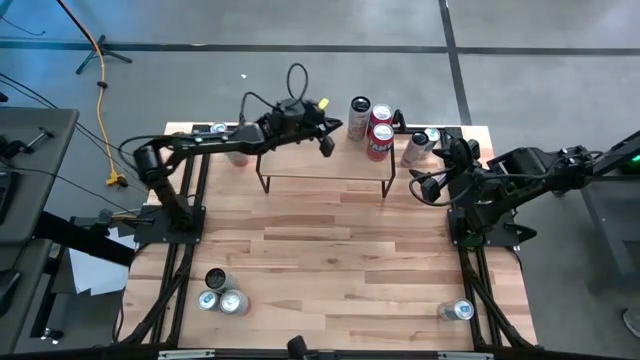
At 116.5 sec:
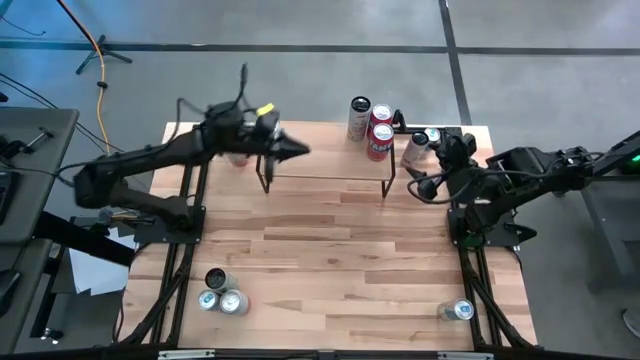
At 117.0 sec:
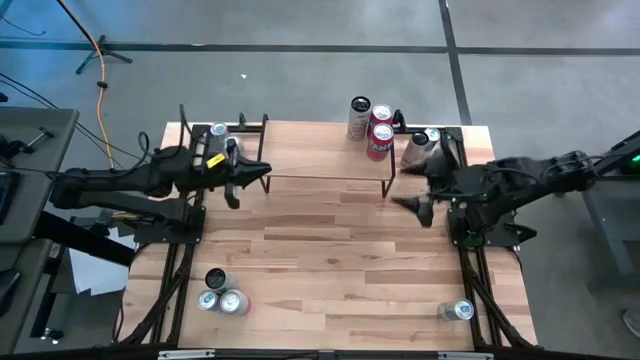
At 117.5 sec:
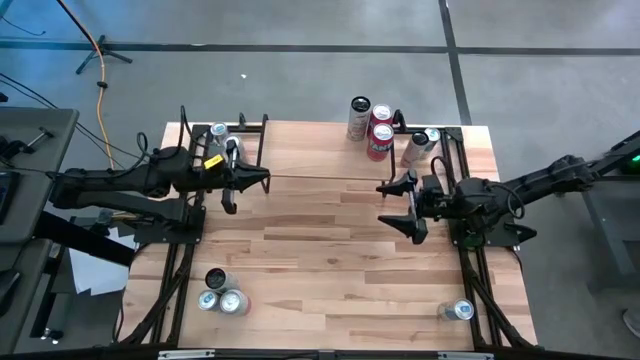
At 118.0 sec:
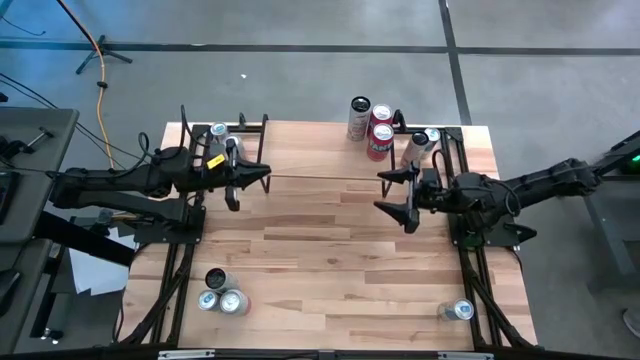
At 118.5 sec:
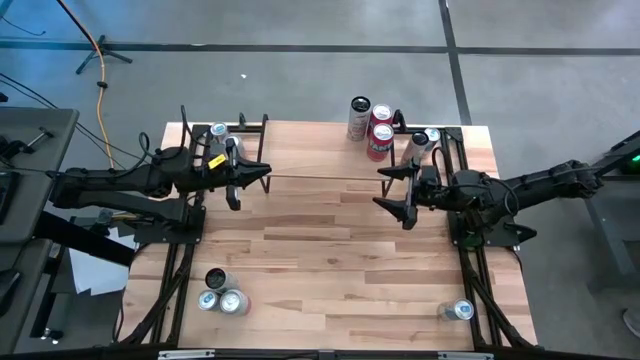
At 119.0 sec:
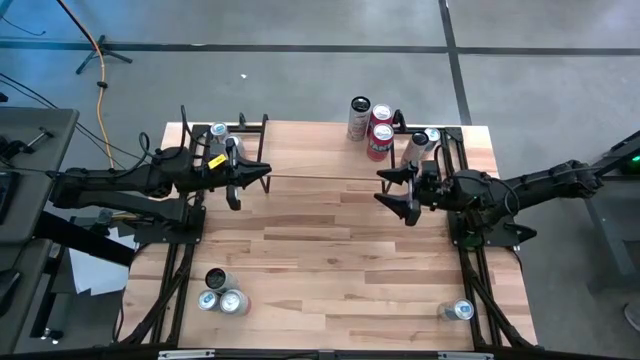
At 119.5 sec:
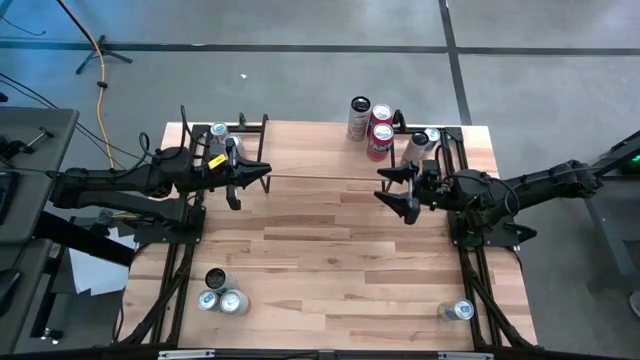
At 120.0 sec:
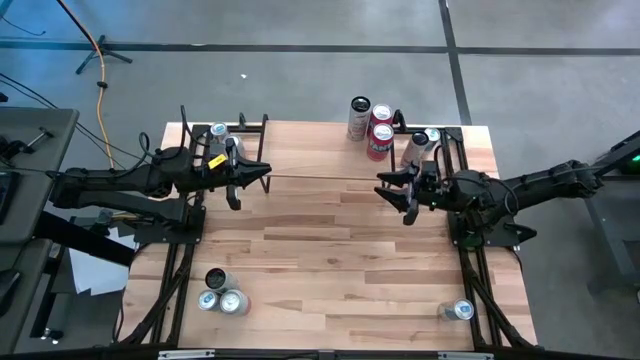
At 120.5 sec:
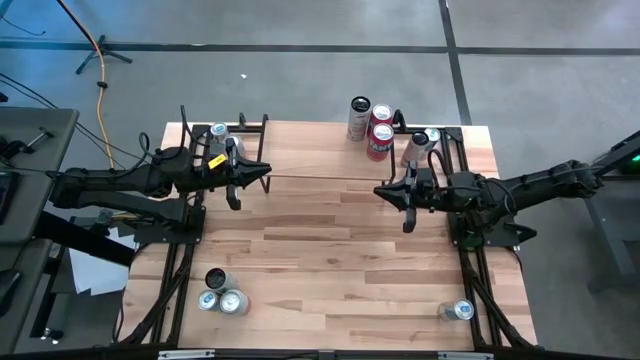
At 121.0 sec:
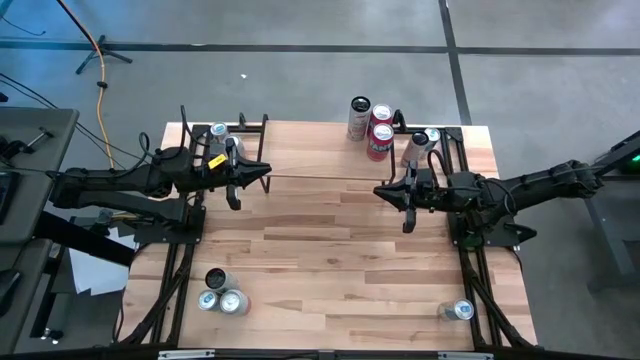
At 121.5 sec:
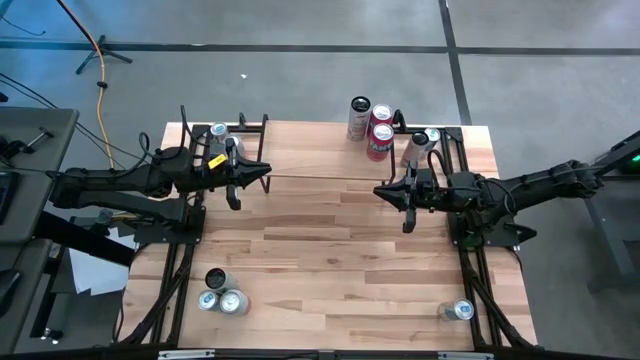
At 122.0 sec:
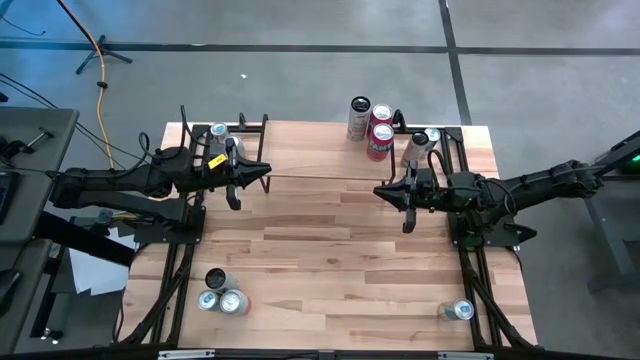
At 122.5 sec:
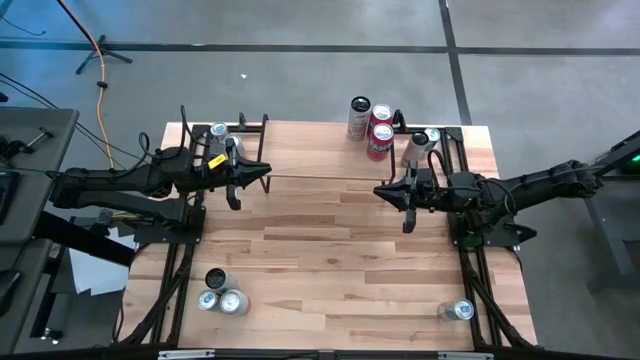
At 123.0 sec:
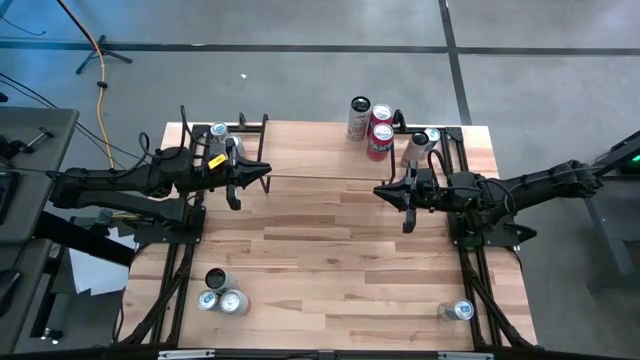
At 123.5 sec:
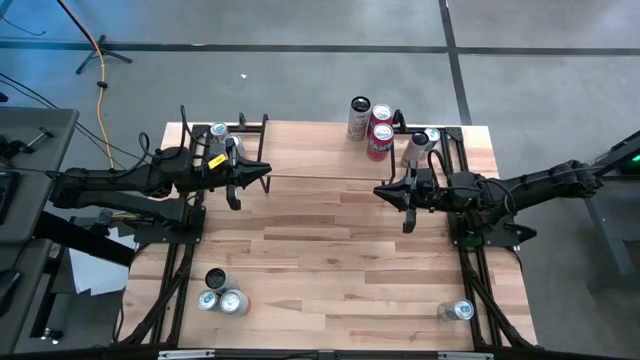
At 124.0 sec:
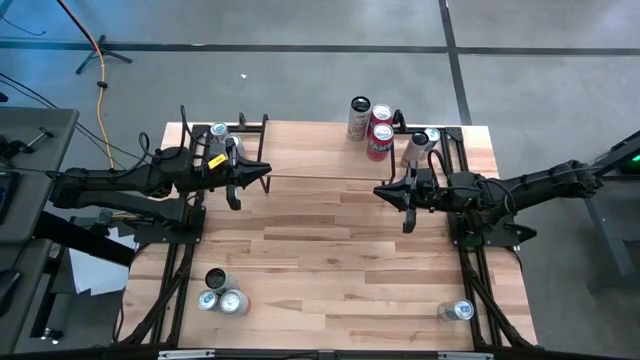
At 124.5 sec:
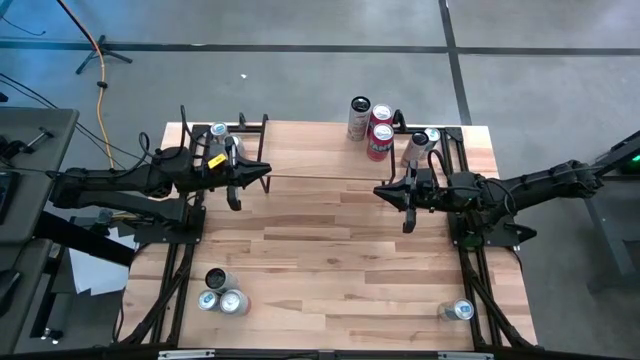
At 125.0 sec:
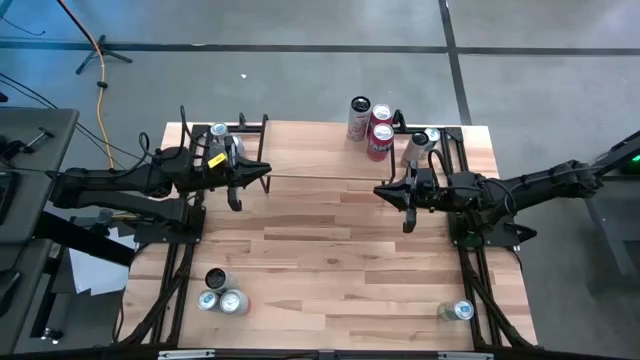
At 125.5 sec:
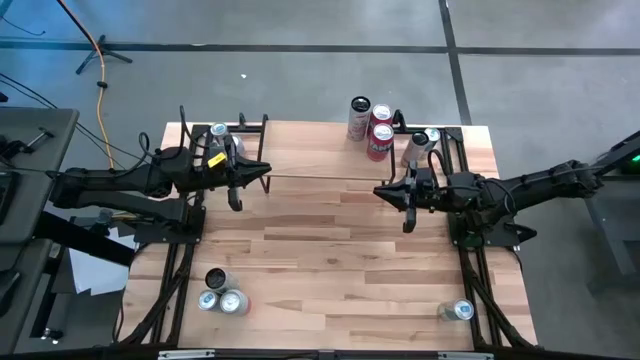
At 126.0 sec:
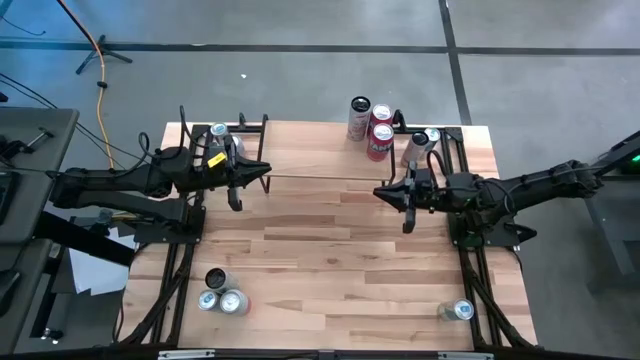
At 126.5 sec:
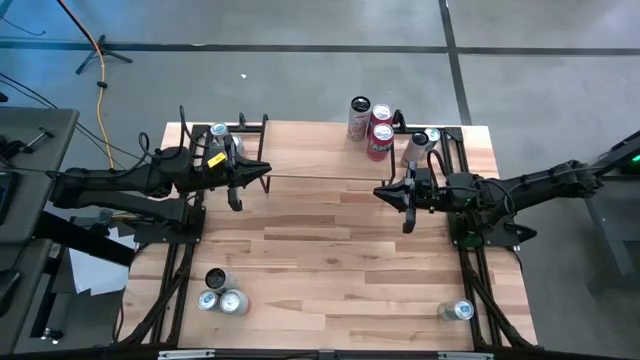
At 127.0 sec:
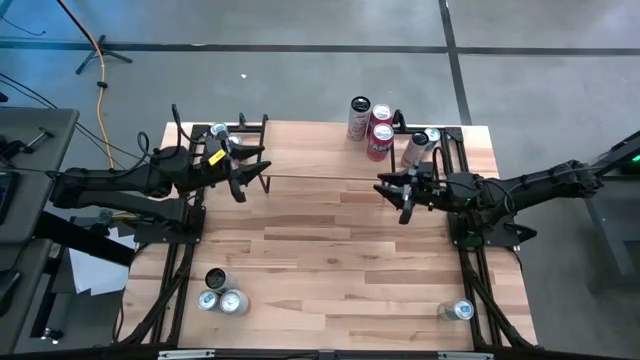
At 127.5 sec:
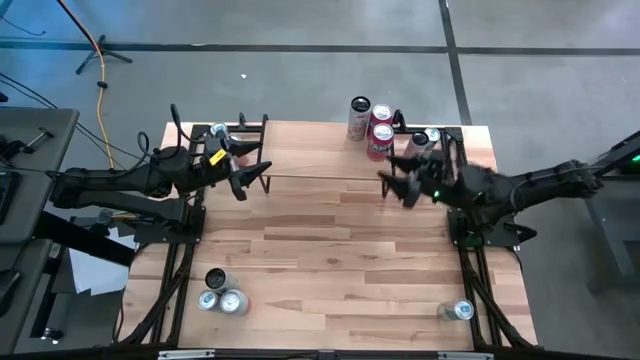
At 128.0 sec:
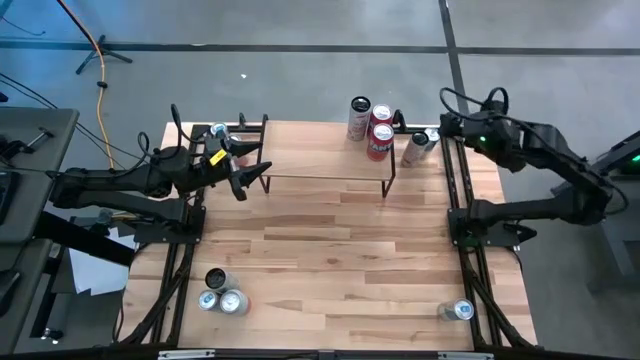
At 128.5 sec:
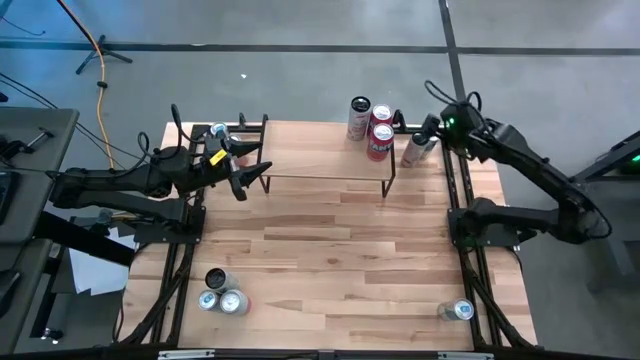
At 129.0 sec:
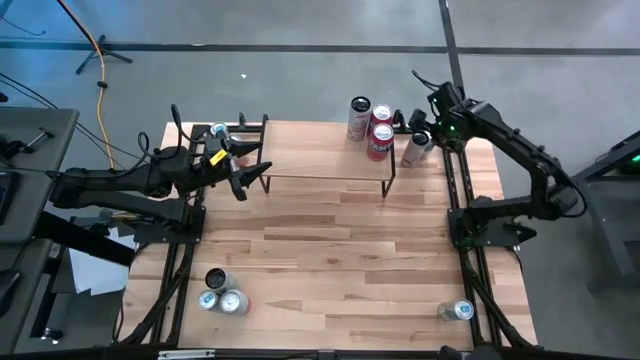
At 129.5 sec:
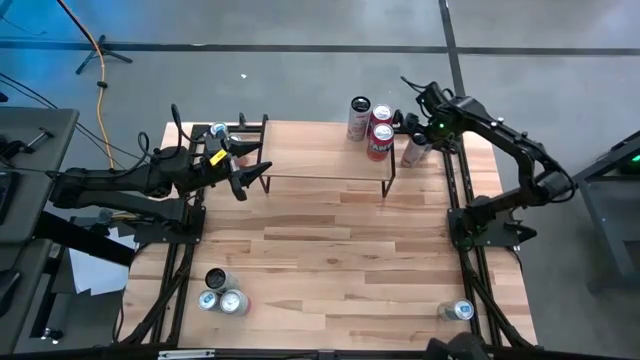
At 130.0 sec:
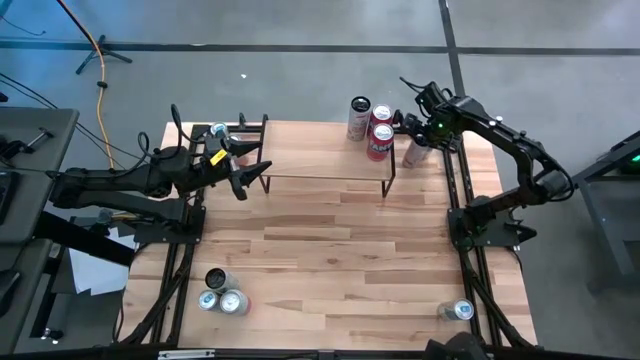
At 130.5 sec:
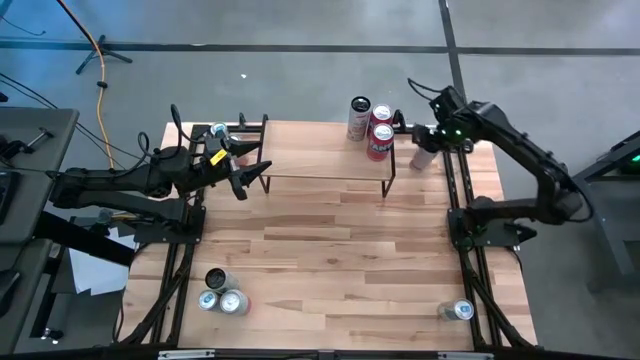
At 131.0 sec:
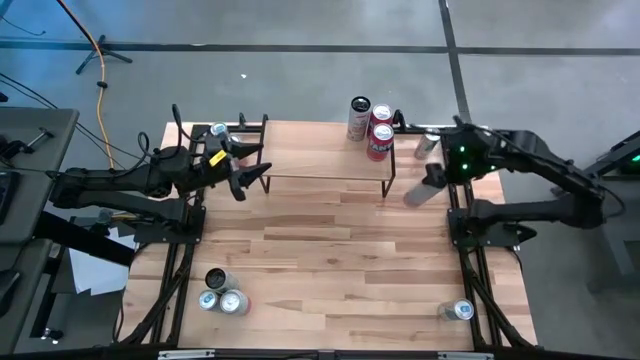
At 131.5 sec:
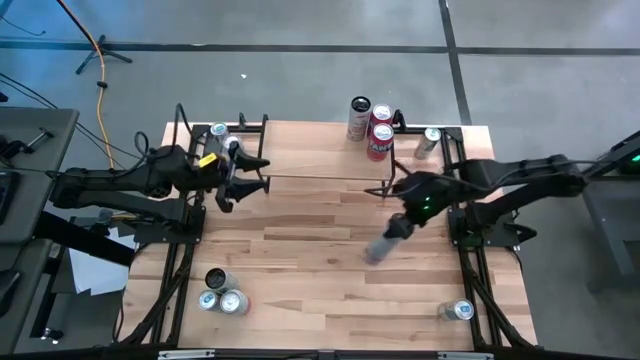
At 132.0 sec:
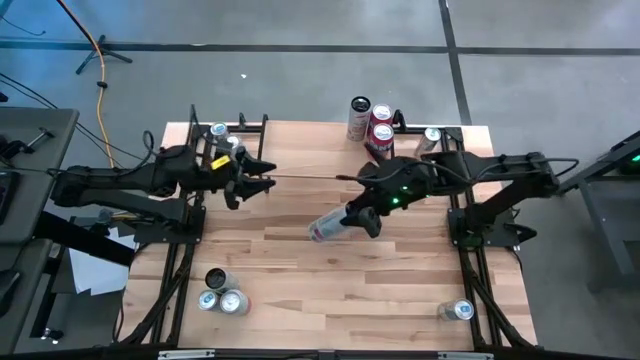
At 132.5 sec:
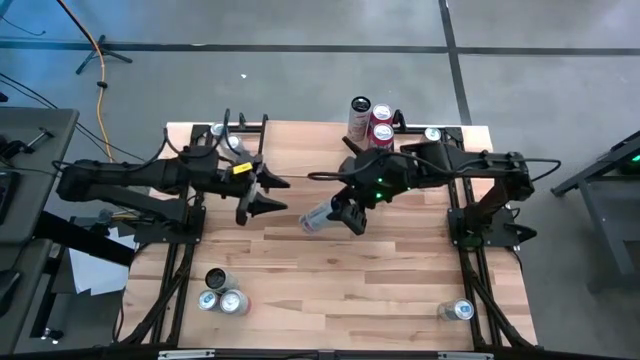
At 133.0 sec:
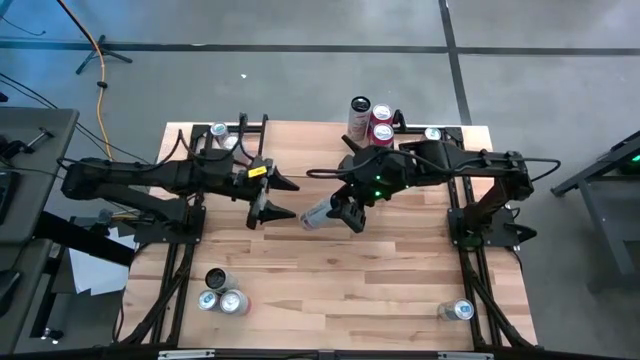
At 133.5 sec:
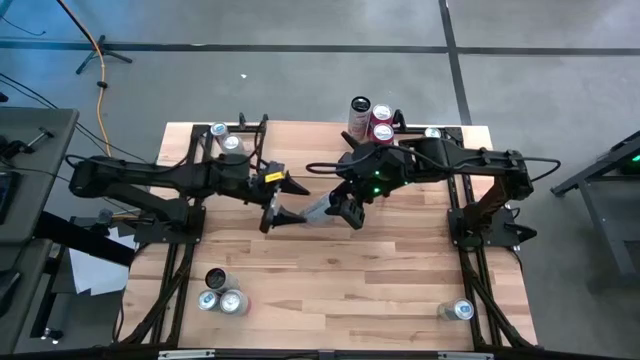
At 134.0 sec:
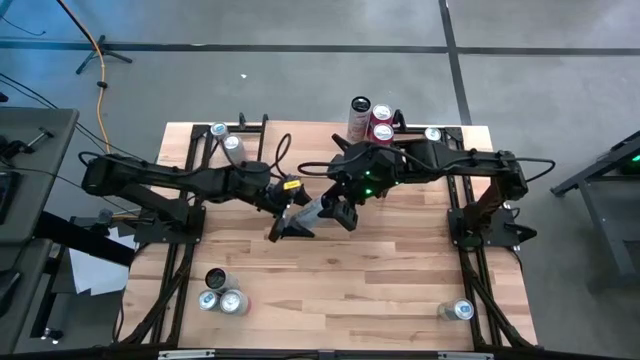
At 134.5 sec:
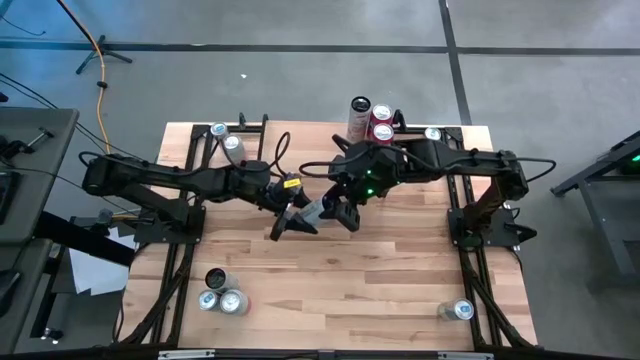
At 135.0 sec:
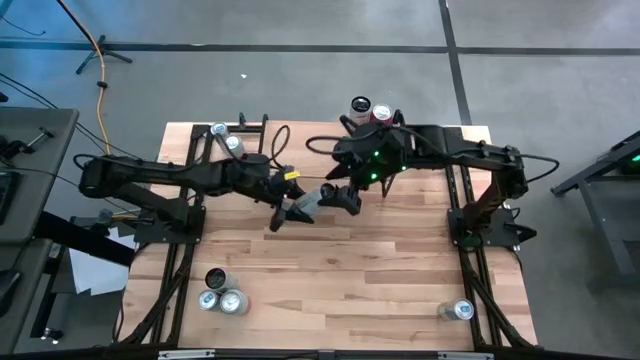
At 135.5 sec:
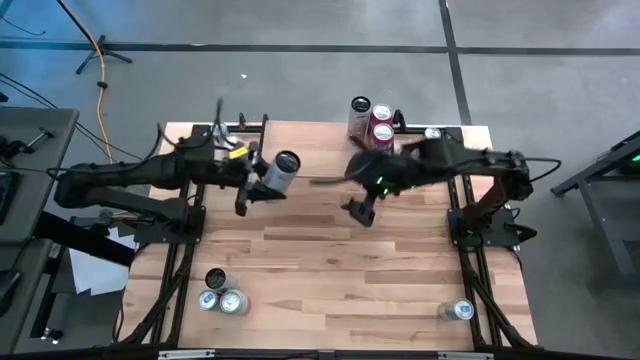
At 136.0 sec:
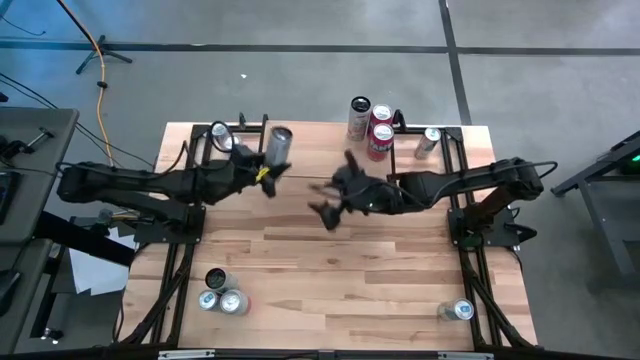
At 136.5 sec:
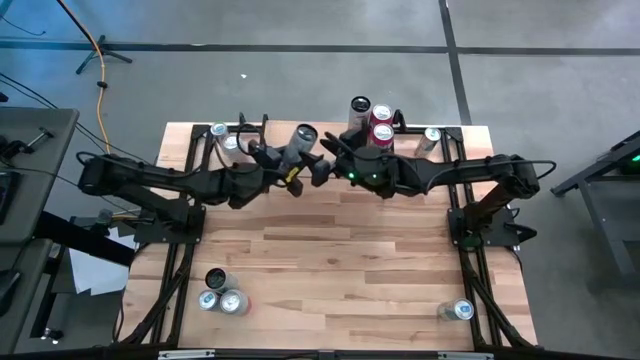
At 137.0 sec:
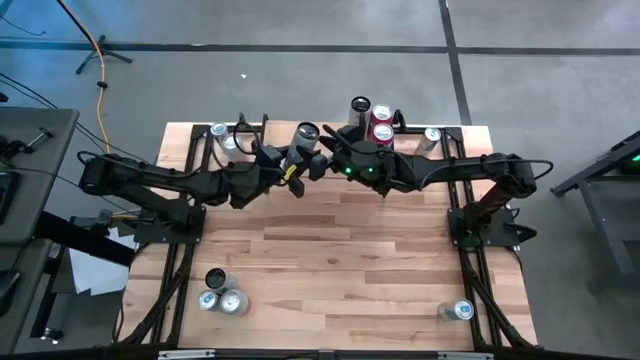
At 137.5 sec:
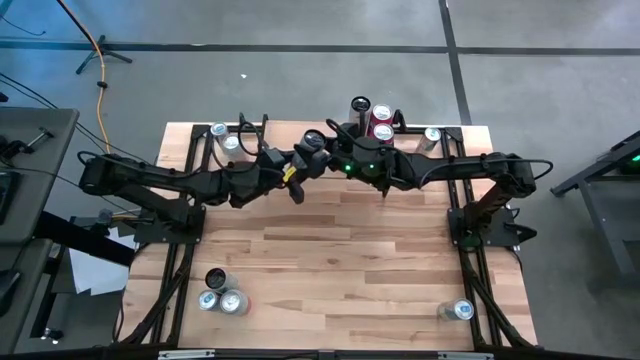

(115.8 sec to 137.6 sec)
Task: Place canned beverage on shelf
Put the top white-pink soda can on the shelf aligned with the white-pink soda can
